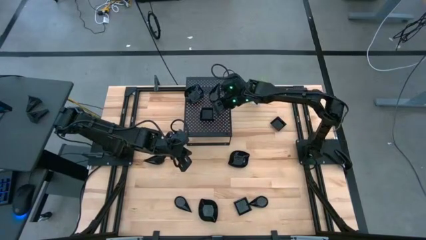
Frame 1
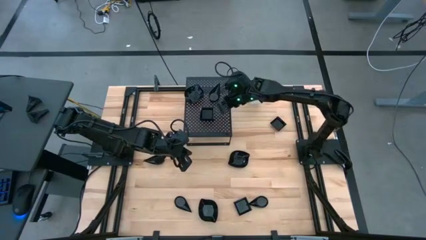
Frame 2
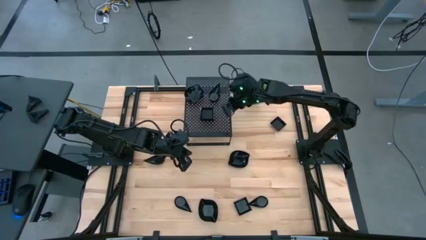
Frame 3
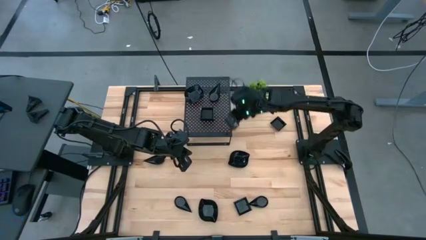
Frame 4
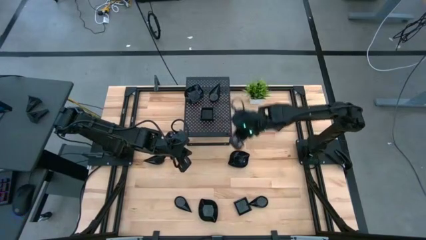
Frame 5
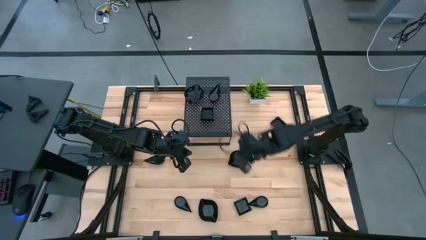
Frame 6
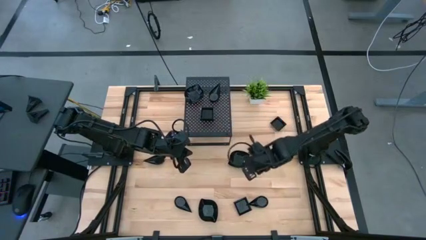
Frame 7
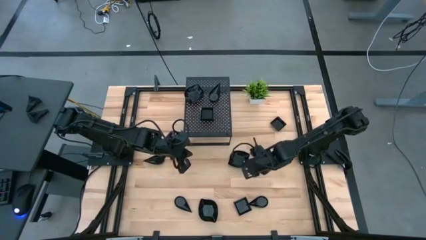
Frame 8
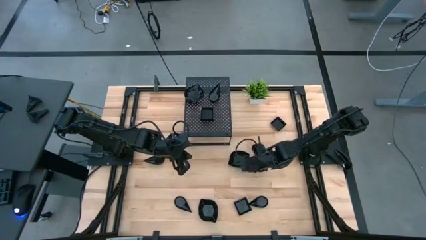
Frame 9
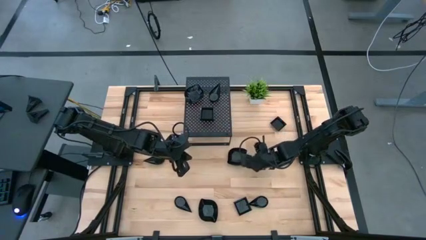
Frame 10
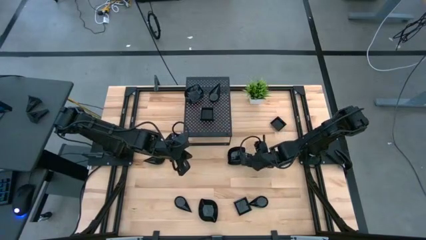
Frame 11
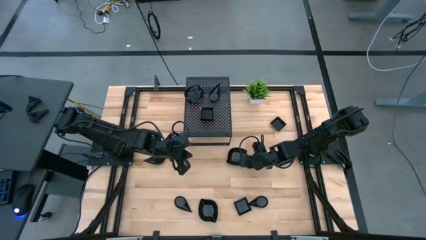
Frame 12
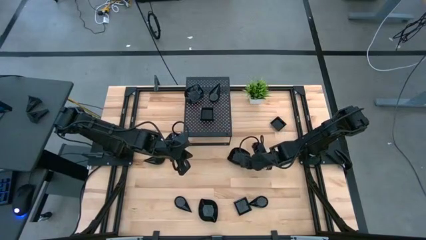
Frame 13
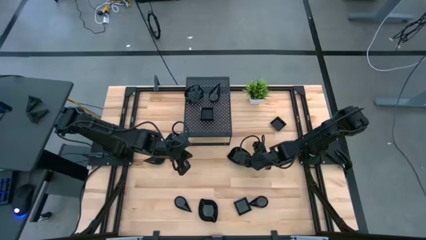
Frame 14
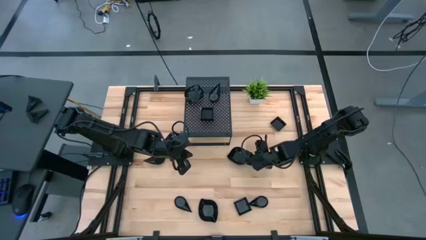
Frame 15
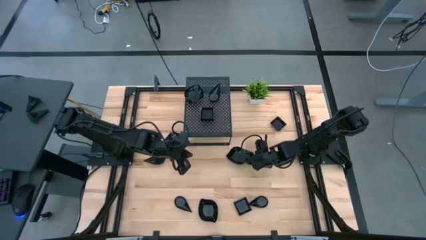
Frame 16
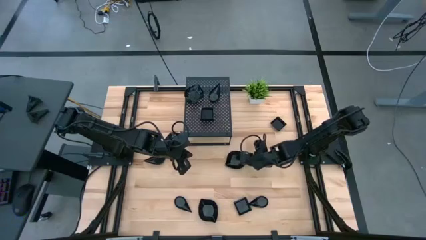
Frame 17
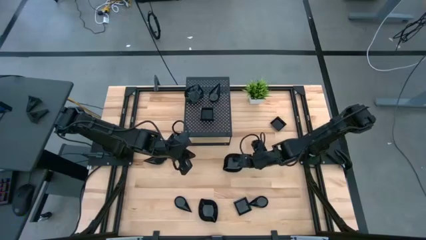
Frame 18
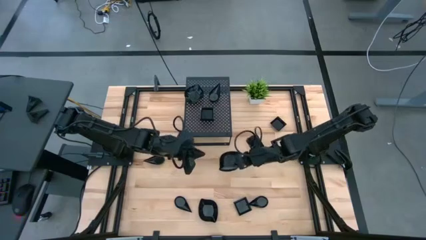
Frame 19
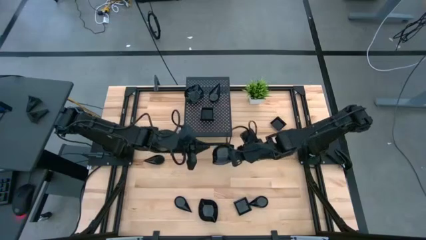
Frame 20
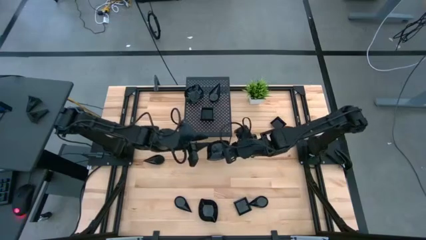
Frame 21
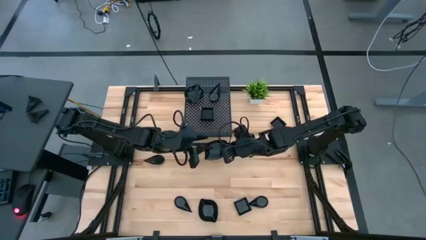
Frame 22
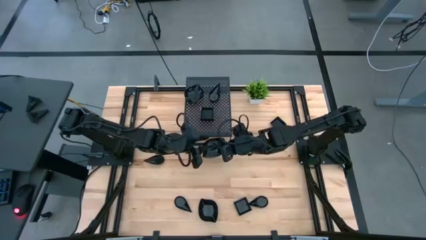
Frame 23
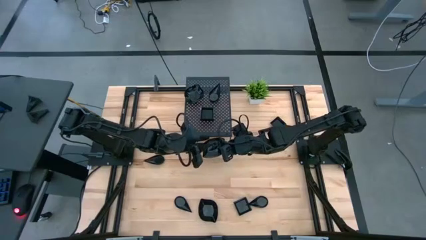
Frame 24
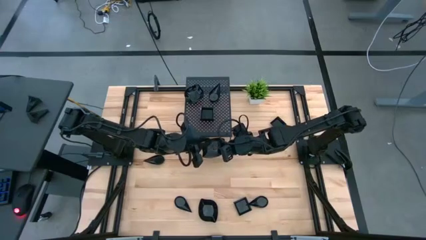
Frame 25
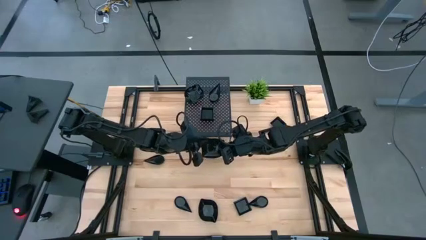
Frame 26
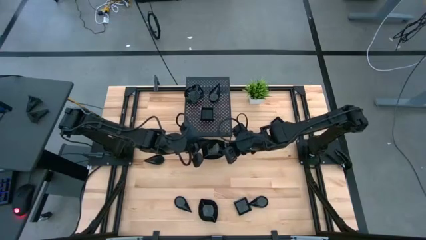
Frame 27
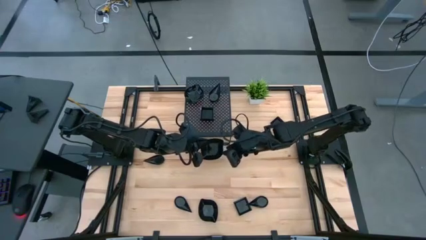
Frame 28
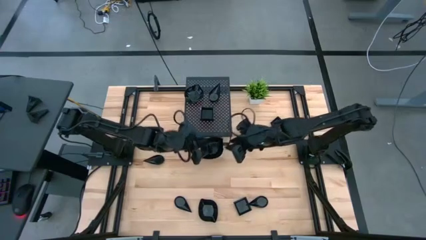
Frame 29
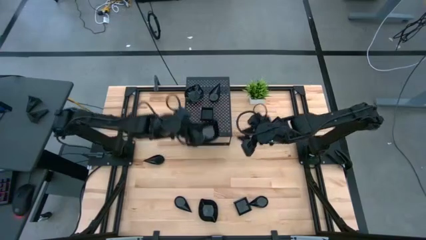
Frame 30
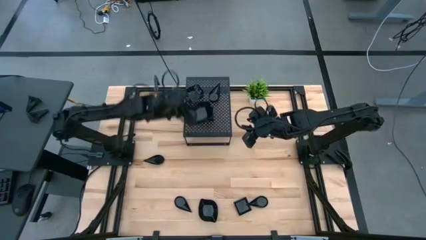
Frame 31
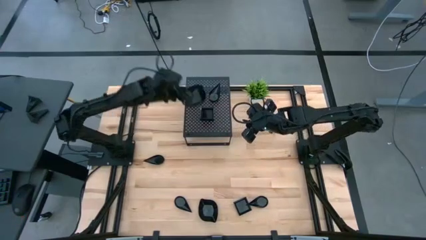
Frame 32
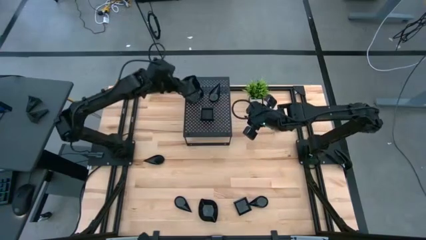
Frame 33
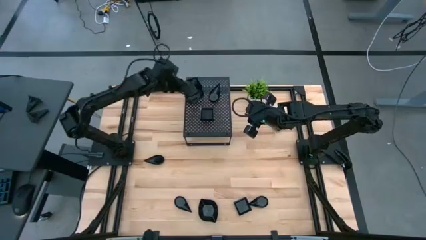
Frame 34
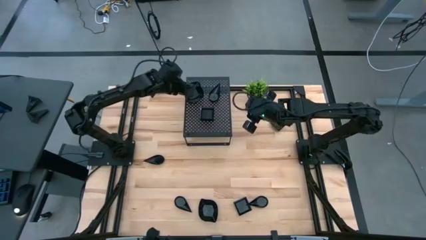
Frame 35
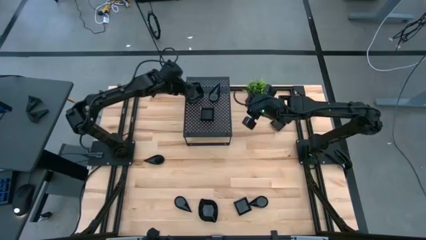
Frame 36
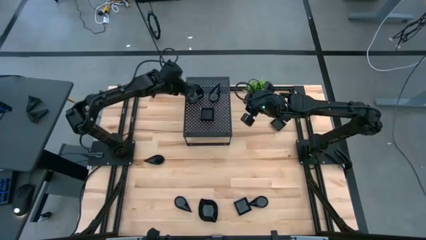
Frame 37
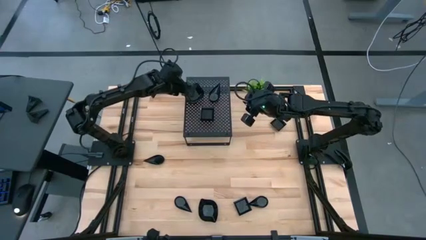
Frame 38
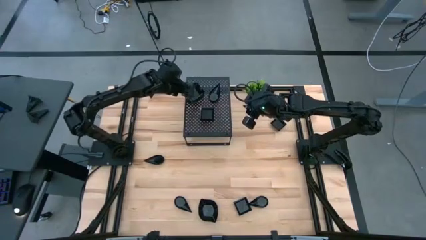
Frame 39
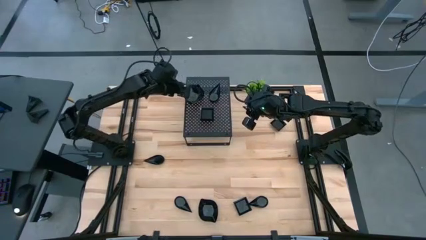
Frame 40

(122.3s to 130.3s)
Task: Pick & Place Mini shaped plates
Stack the leaf shaped plate on top of the leaf shaped plate on the shelf

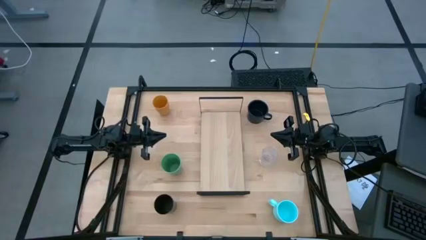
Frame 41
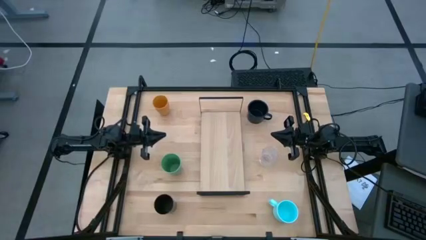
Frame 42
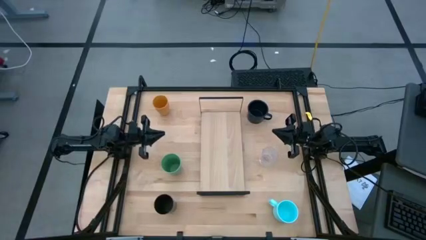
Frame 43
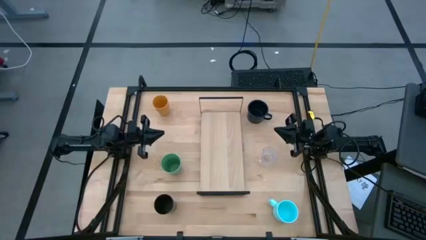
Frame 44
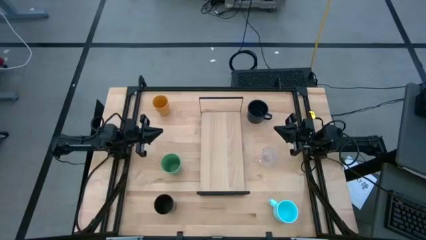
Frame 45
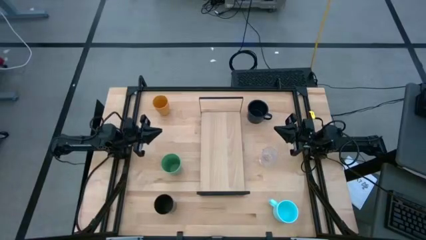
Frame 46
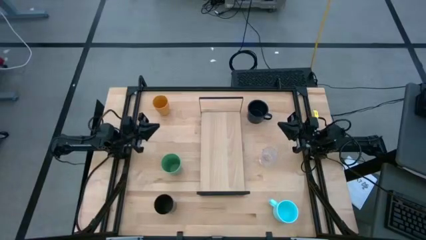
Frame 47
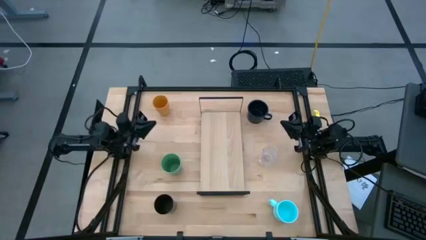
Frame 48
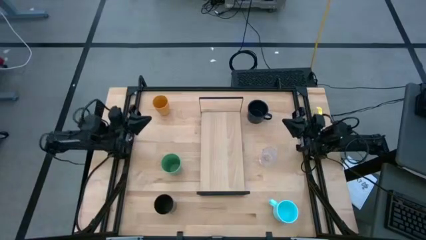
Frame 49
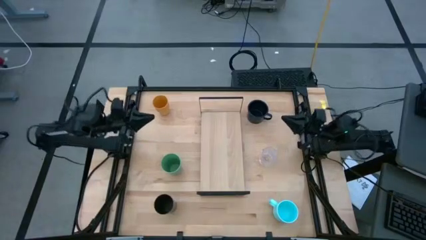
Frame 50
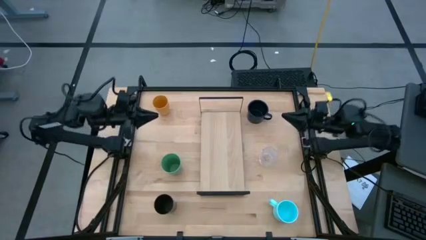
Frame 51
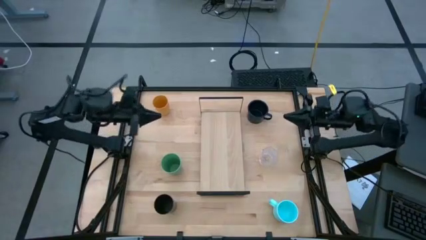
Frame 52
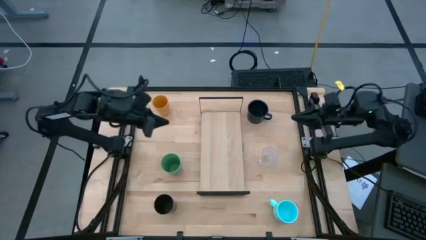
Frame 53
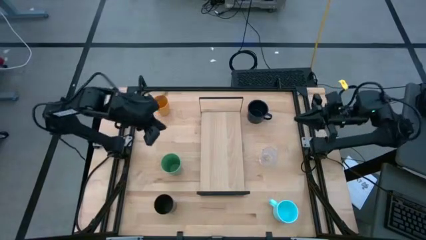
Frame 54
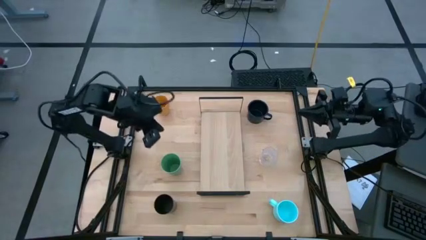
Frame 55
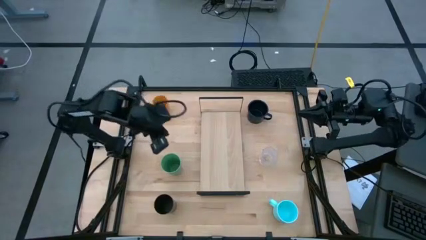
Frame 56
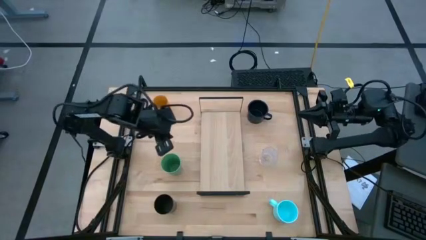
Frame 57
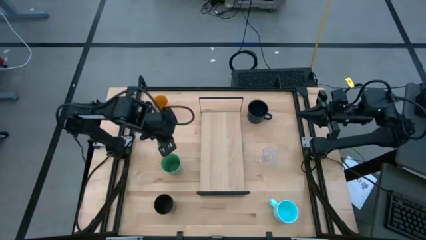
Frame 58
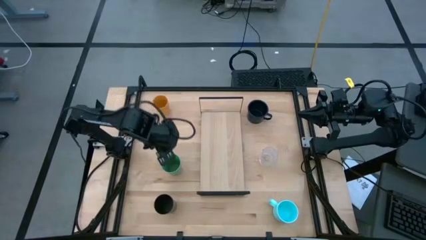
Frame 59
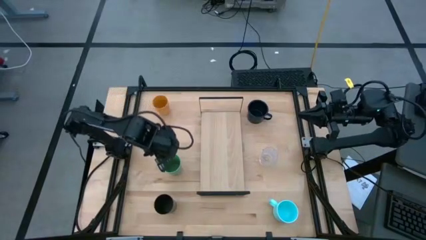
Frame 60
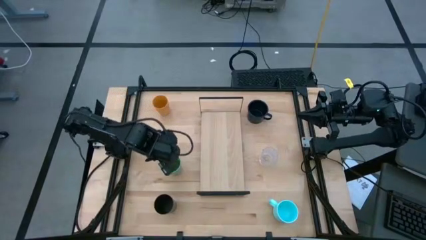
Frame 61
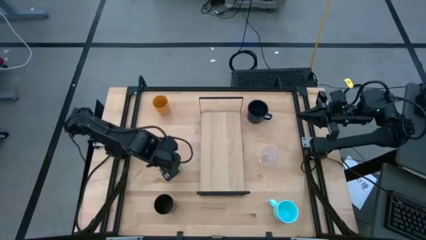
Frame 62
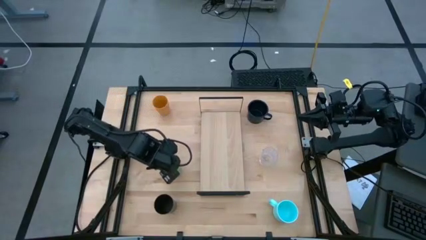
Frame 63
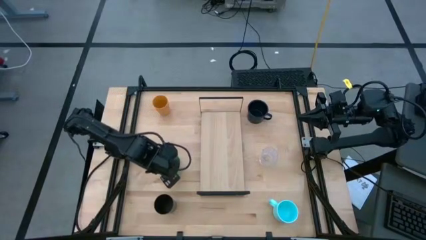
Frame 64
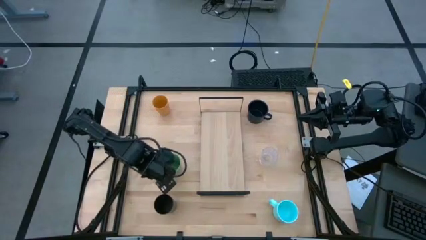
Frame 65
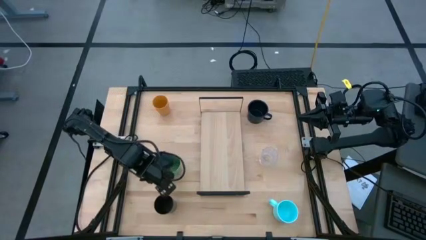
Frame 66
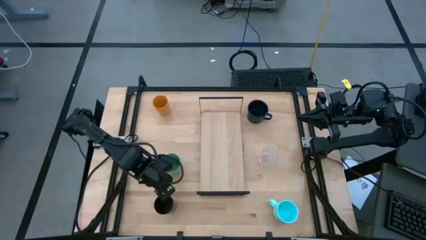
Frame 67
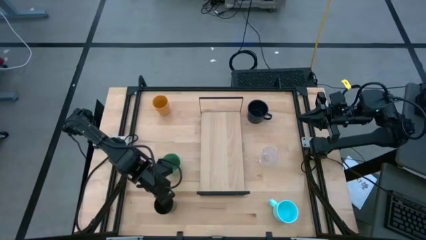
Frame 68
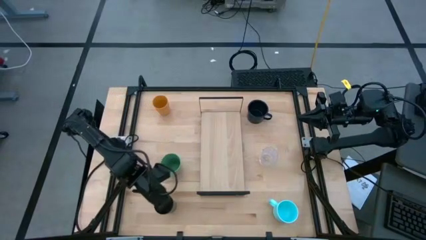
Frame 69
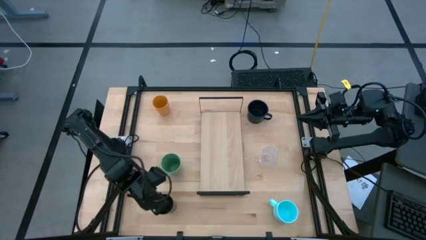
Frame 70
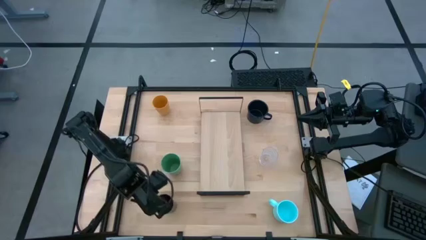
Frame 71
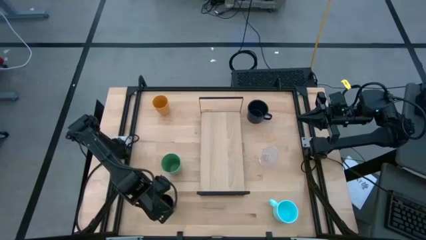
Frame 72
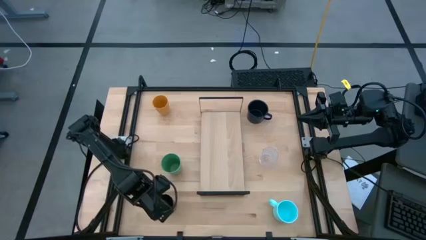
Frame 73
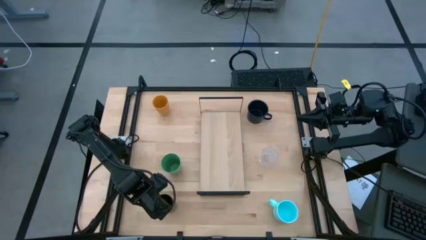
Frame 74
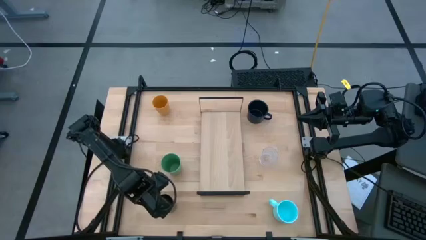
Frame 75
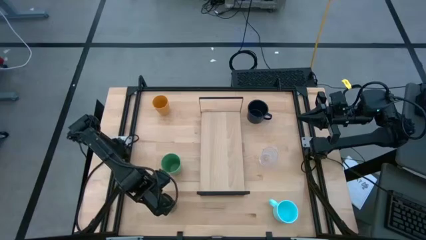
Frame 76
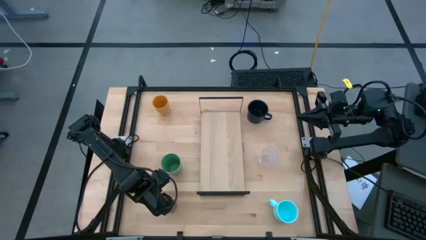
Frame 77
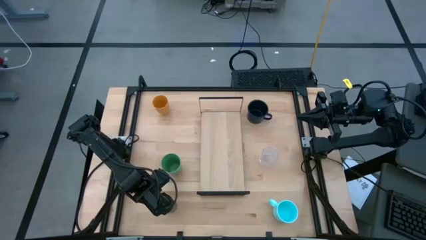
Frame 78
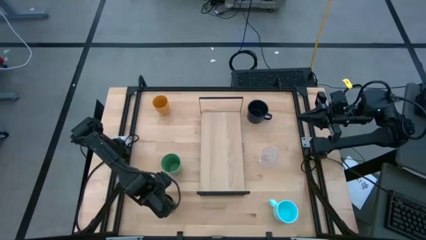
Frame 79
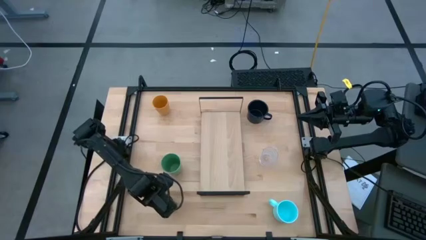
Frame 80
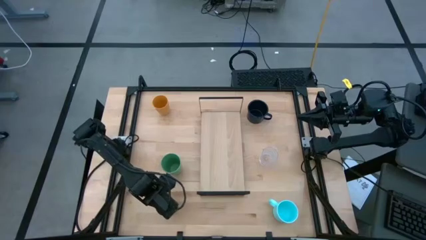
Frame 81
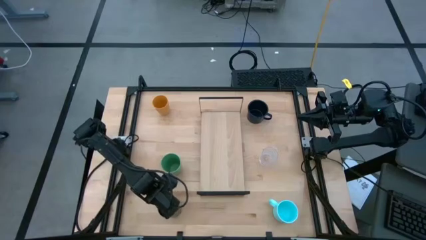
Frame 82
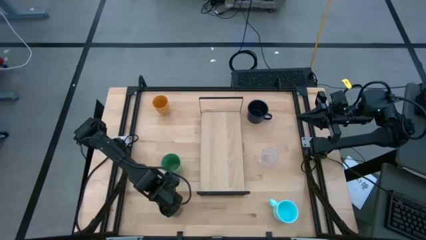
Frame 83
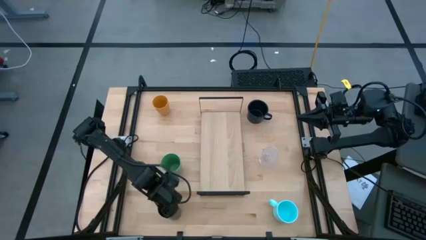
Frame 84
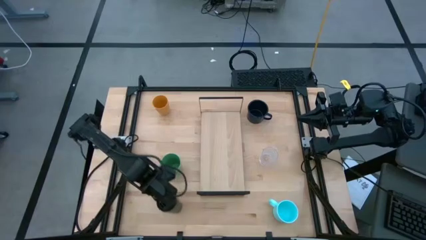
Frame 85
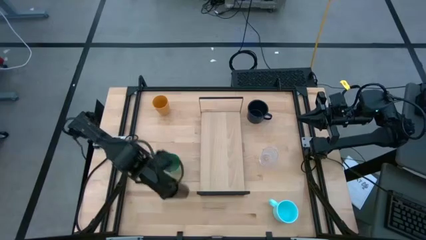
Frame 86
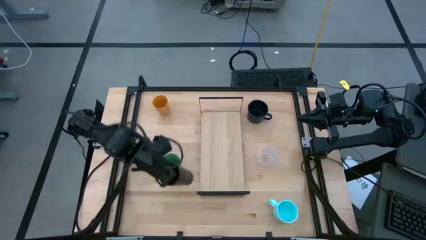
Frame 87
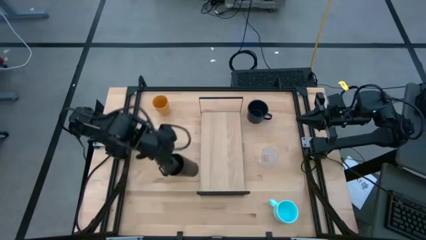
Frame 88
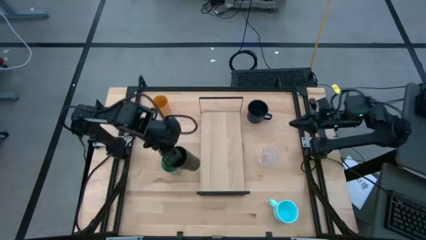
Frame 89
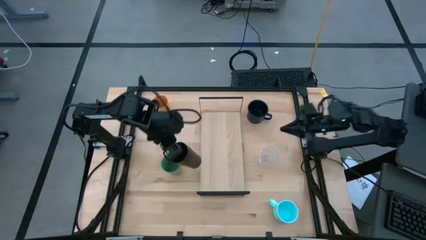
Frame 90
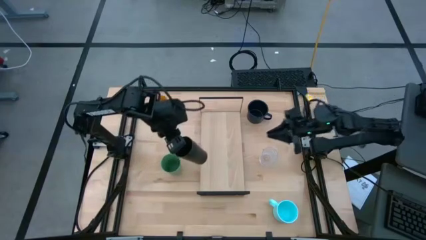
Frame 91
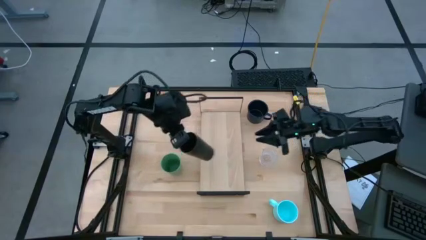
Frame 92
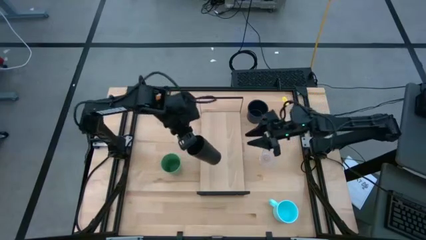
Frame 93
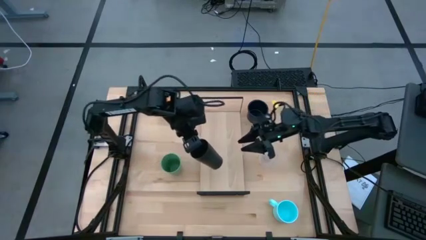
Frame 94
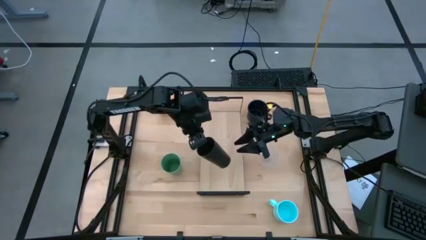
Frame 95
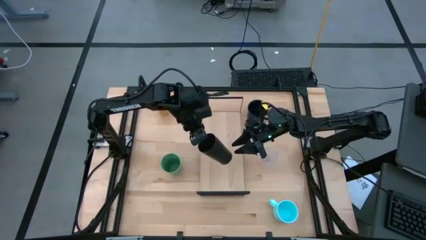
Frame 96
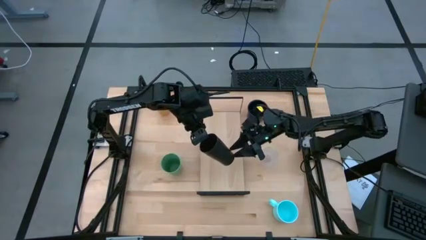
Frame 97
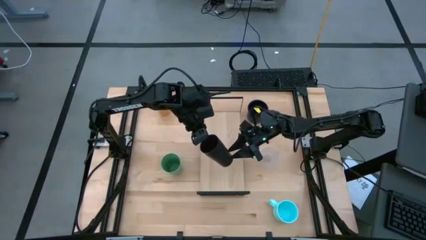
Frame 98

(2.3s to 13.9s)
Task: Stack small to large cups/mugs on shelf
Put the black cup on the shelf
